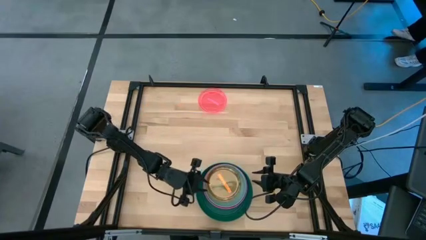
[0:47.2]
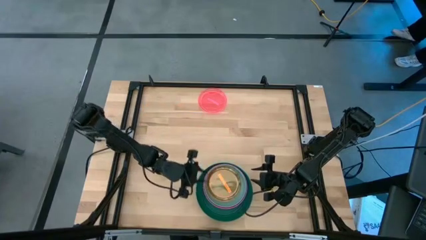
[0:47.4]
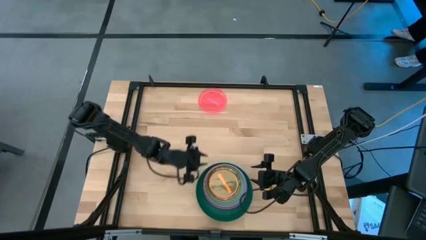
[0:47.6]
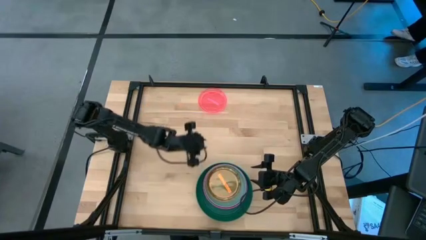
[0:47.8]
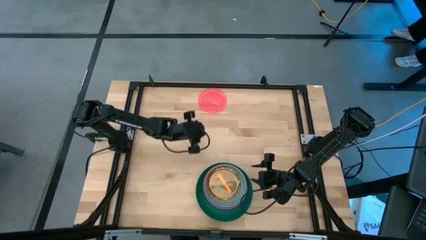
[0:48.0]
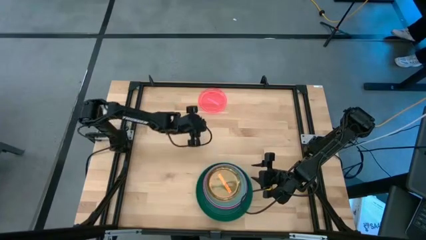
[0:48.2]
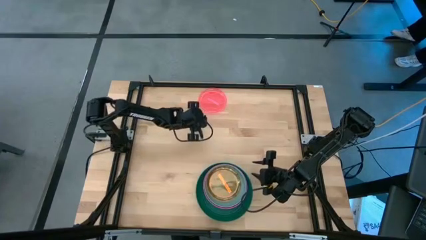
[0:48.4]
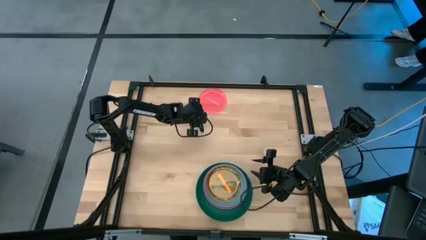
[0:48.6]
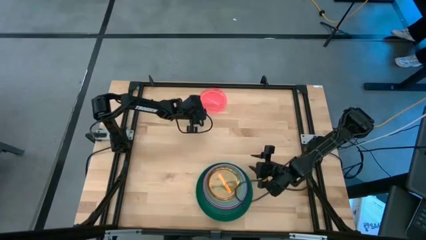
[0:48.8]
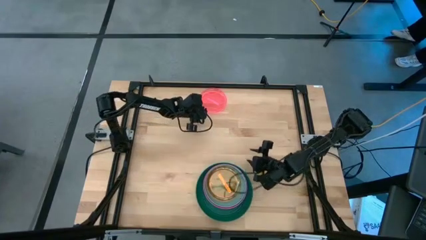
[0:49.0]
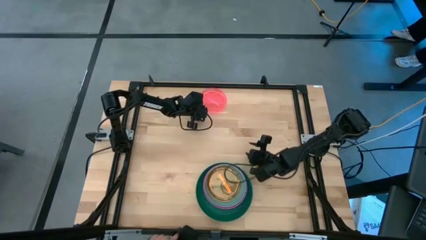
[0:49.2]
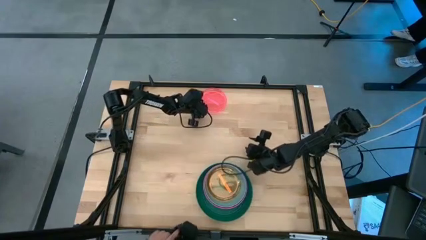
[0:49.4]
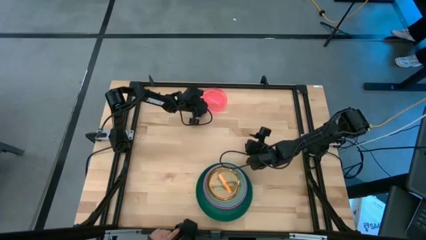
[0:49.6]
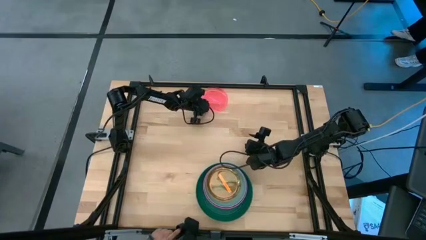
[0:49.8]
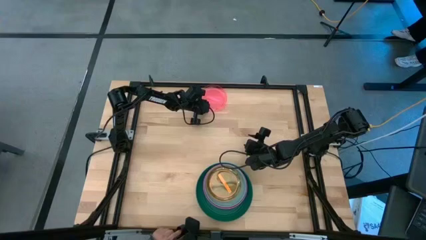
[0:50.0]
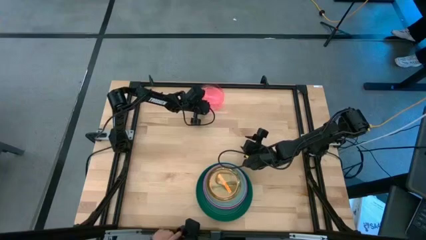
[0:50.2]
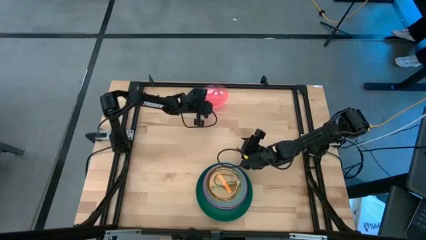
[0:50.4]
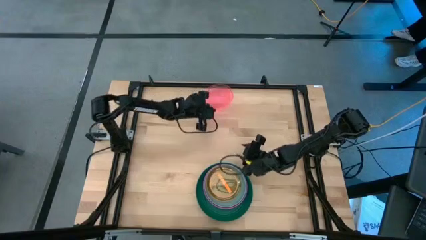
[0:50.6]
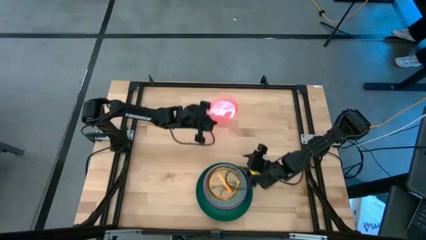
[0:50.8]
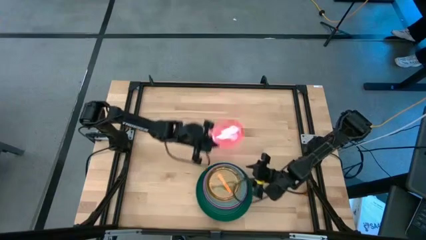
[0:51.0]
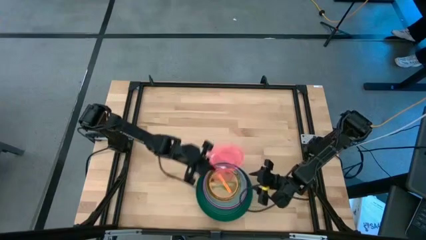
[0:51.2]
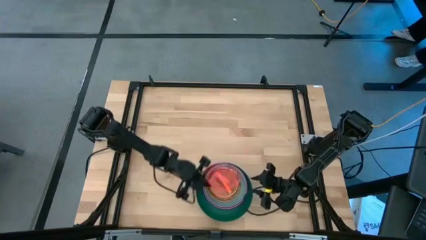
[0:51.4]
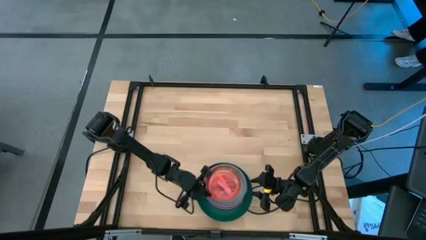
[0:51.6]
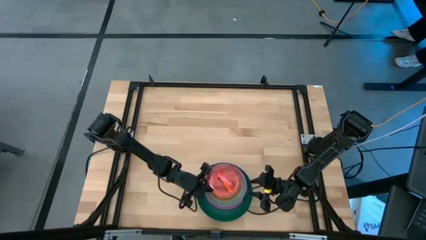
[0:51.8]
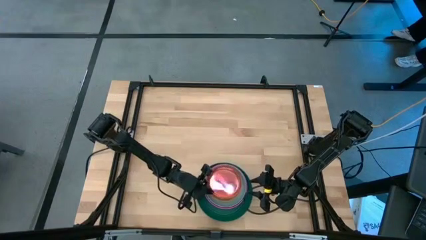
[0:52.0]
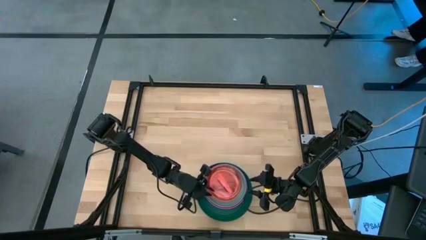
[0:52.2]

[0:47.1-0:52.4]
Task: Stack plastic plates
Stack the light pink transparent plate on top of the orange transparent plate

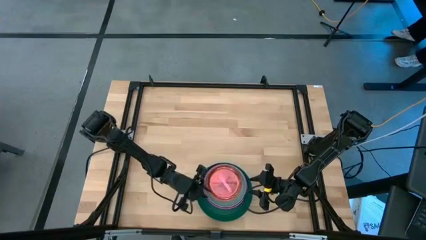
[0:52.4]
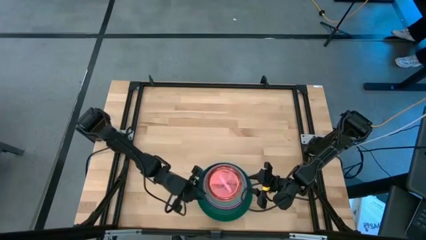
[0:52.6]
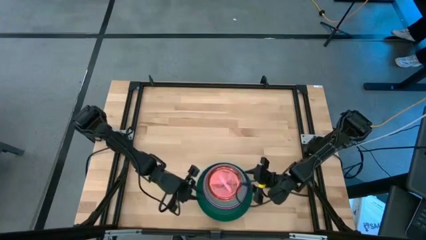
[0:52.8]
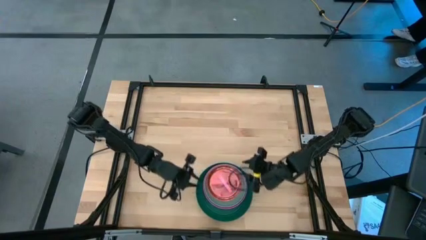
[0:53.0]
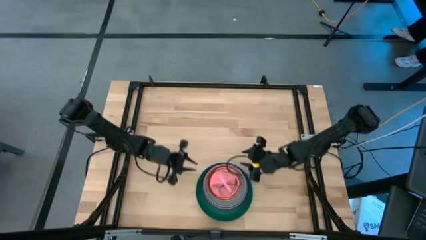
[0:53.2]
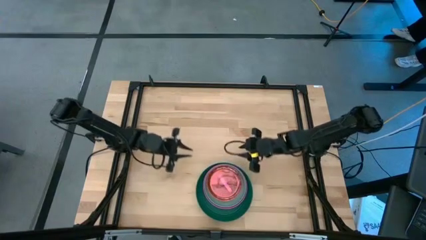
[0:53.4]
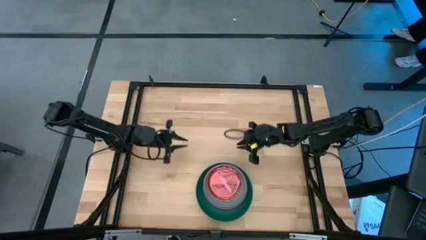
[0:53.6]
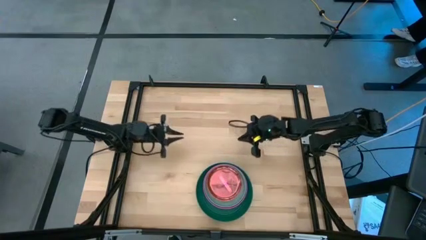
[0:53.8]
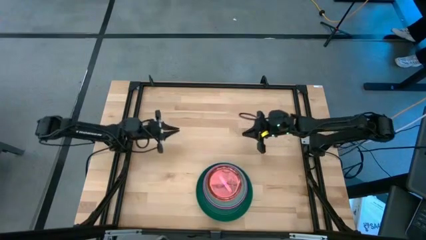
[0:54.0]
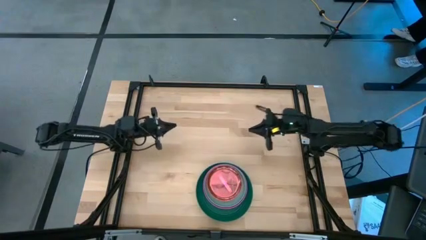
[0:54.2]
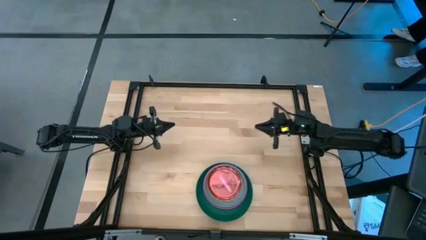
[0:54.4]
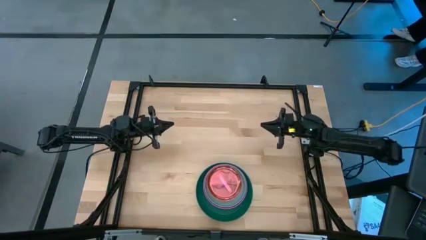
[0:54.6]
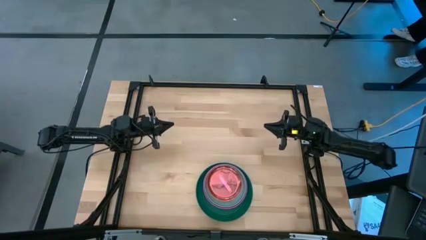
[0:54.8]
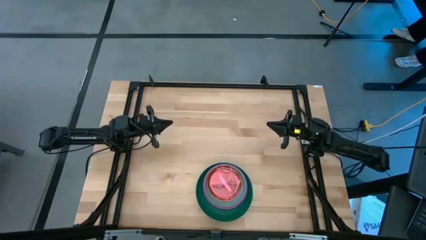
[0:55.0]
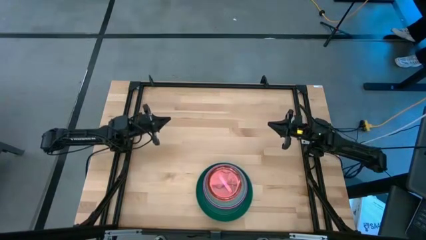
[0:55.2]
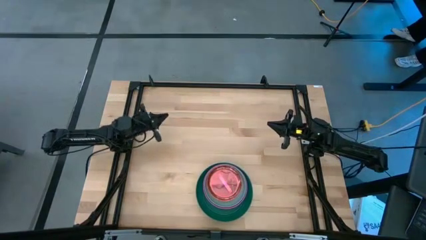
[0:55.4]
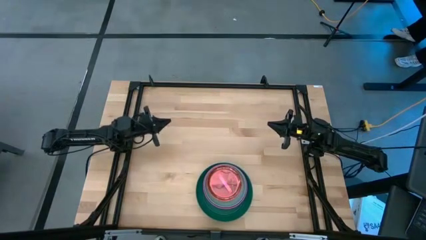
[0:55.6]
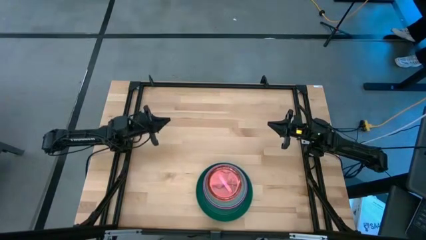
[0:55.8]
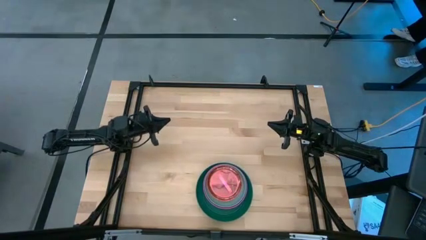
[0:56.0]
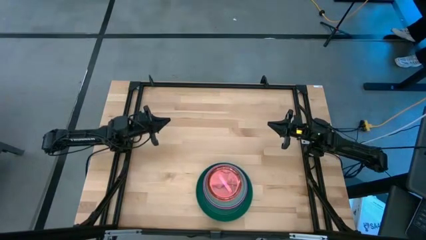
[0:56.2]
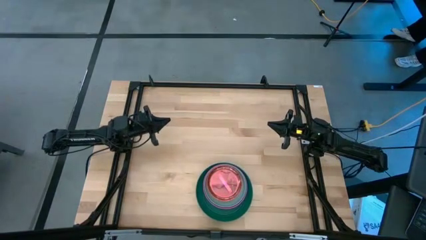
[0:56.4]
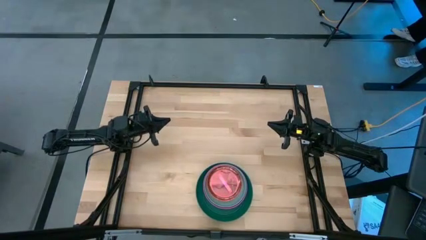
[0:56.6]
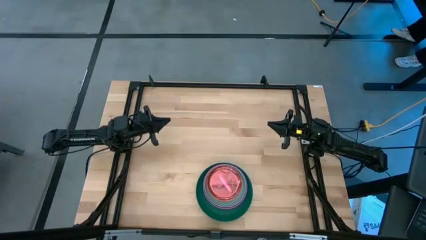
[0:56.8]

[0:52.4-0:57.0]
Return to Home Position

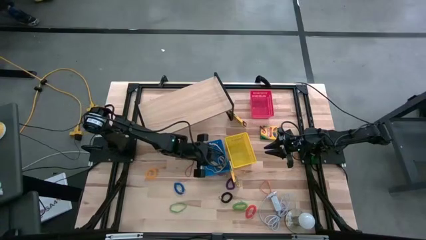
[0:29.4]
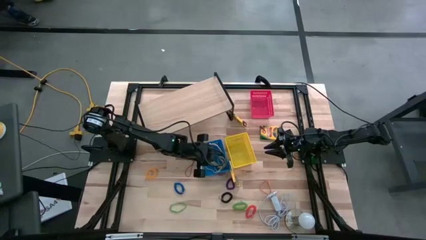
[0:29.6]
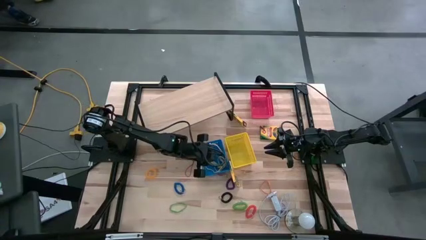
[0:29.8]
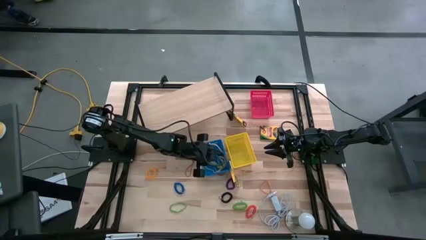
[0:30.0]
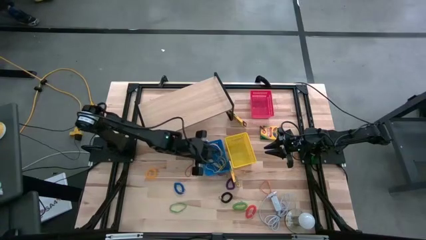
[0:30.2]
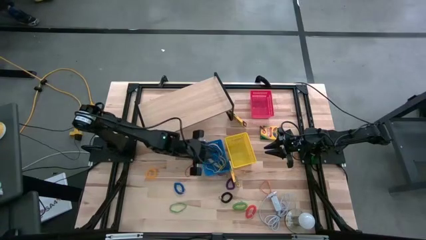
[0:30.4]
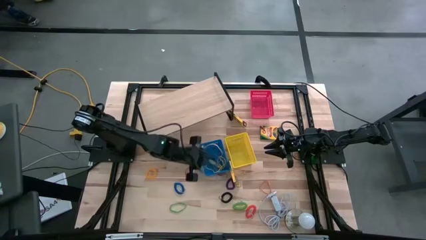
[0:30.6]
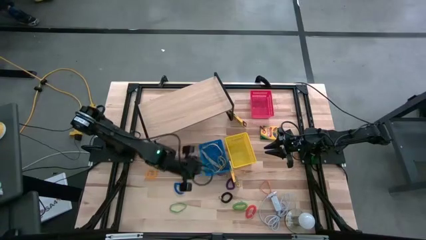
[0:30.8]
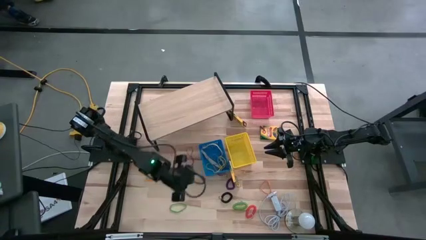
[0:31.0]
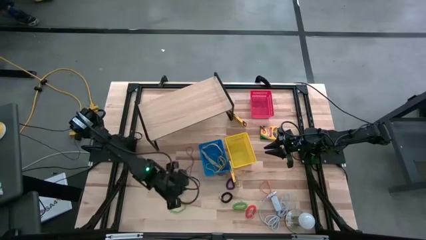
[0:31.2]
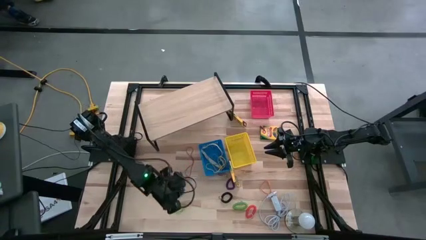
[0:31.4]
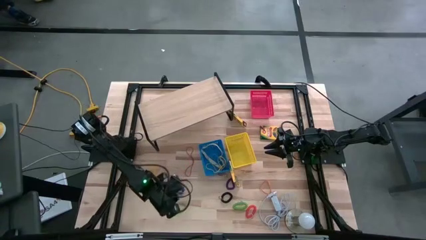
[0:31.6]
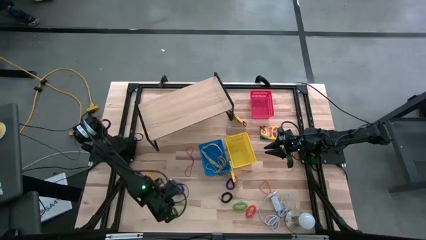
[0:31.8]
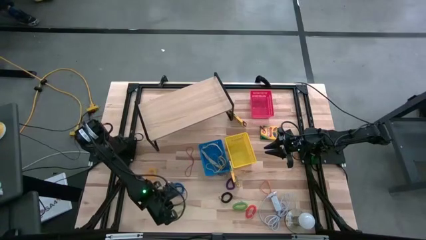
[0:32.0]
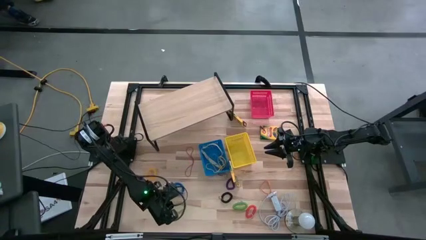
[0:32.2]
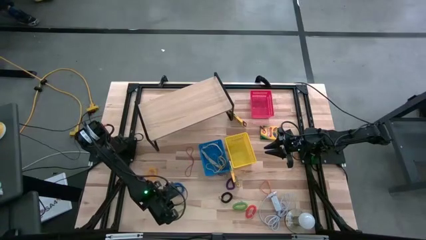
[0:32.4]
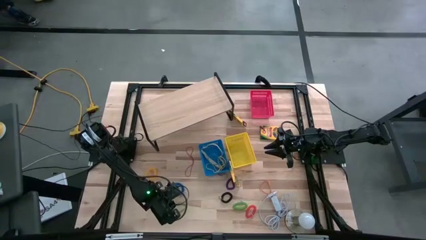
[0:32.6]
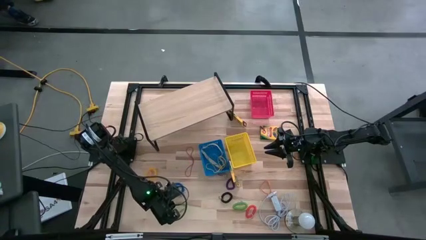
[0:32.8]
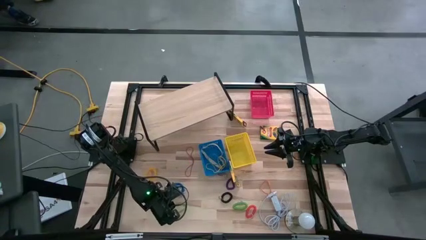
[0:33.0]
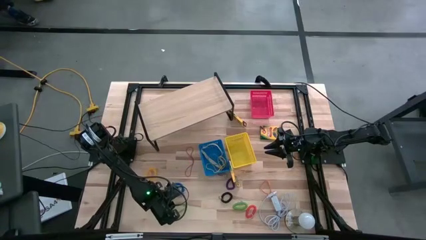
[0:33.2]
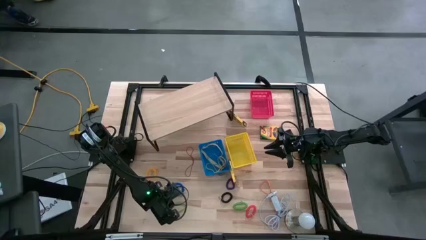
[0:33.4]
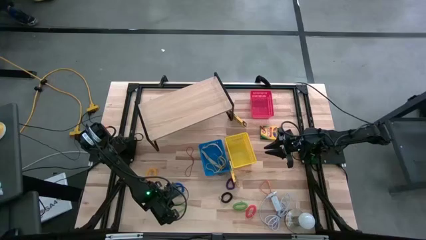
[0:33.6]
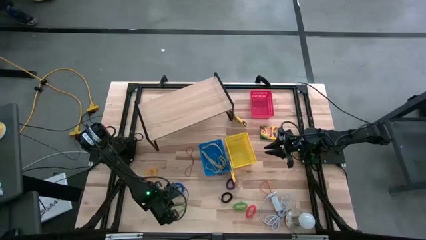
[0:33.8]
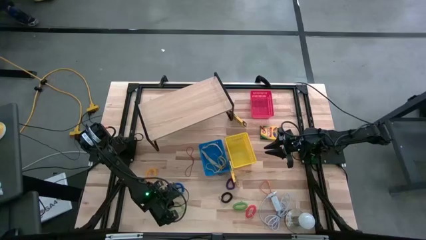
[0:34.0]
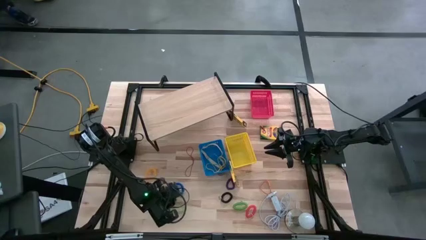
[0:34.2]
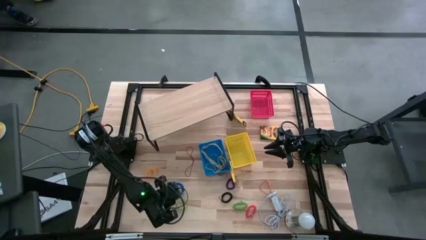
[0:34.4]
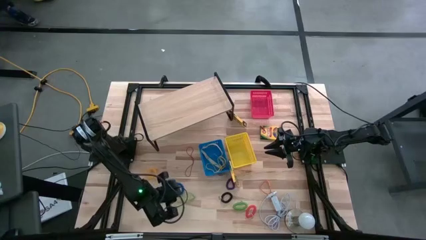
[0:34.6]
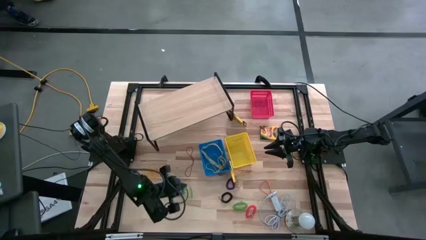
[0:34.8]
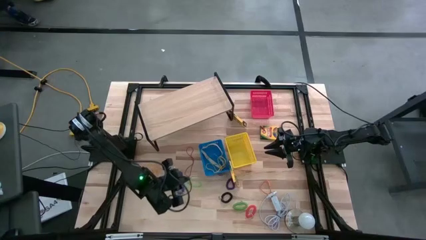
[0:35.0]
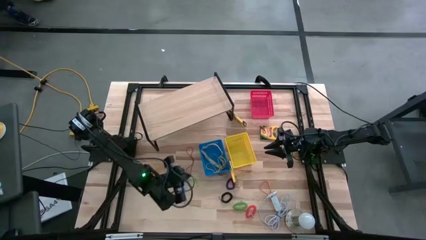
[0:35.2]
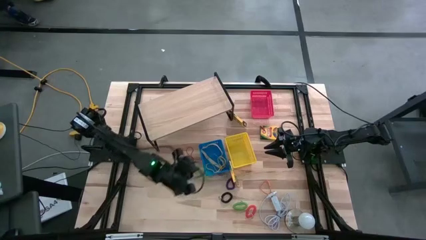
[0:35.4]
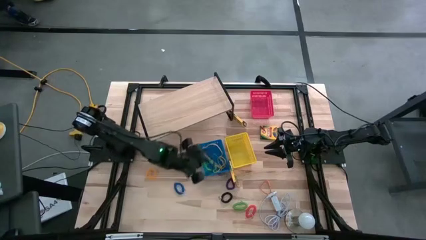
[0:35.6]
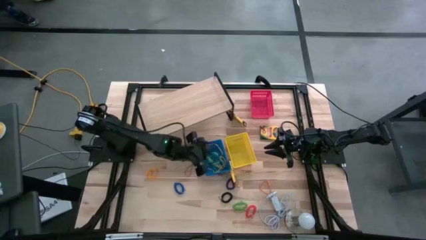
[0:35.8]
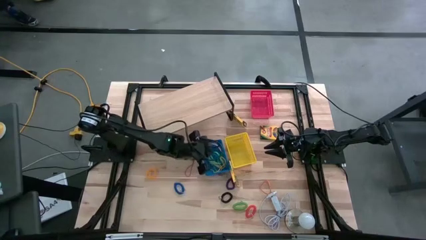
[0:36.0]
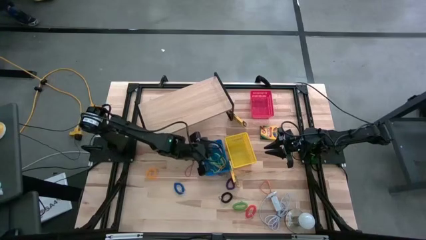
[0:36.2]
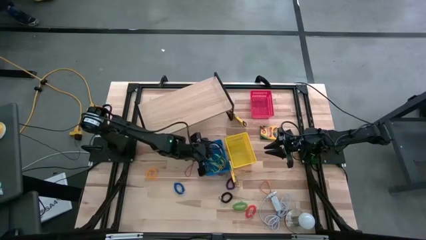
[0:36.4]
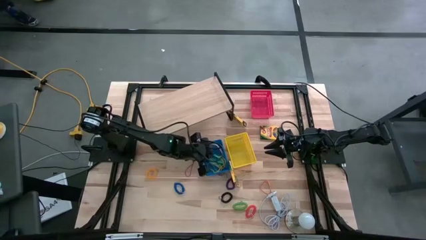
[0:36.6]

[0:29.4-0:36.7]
Task: Pick & Place Office Desk Supplies
Put the green rubber band into the blue bin
